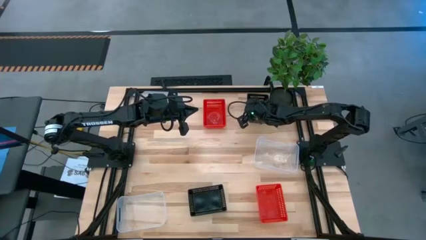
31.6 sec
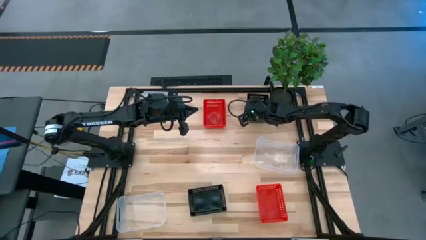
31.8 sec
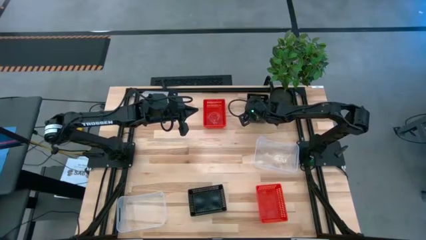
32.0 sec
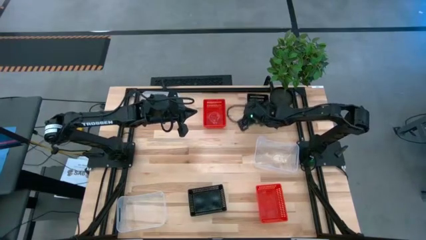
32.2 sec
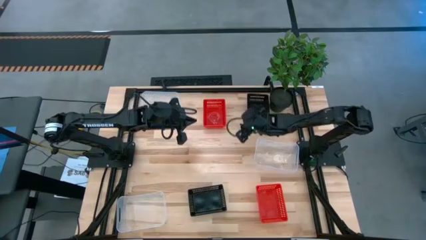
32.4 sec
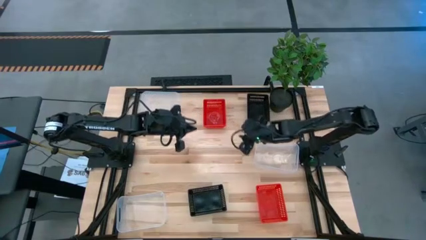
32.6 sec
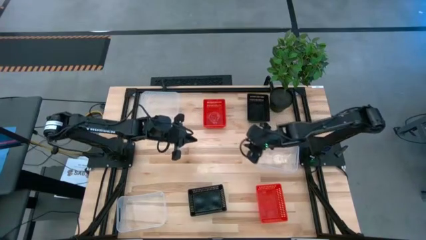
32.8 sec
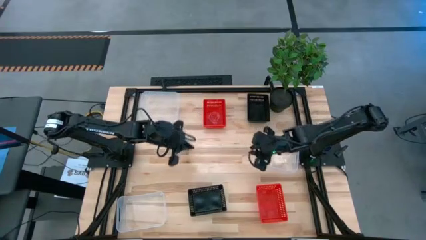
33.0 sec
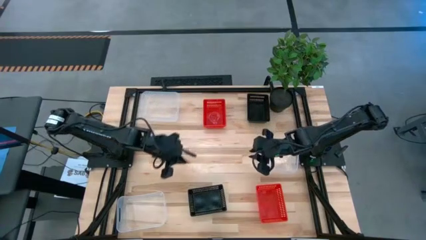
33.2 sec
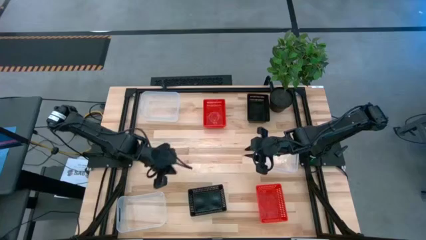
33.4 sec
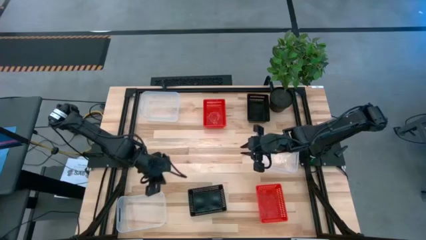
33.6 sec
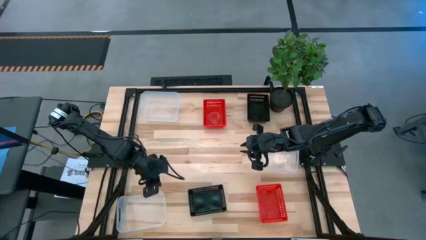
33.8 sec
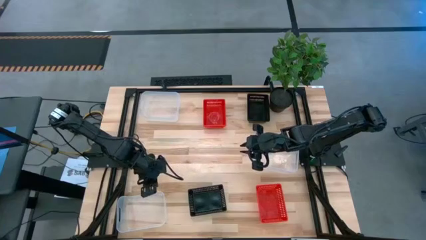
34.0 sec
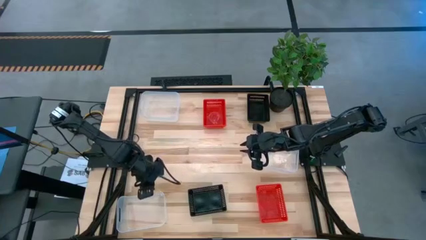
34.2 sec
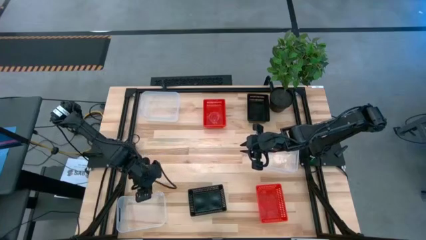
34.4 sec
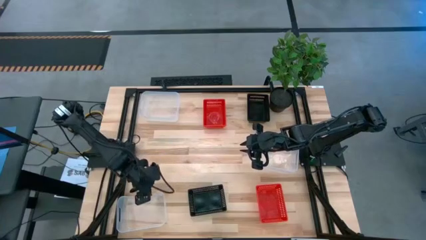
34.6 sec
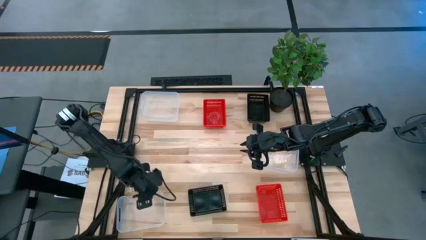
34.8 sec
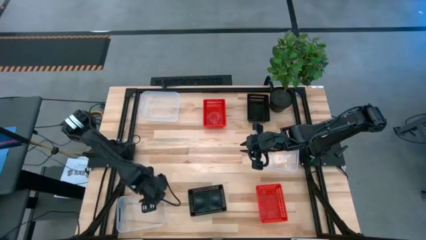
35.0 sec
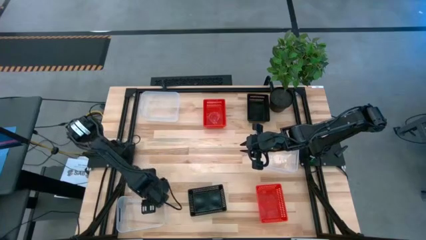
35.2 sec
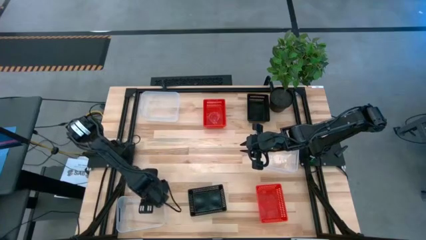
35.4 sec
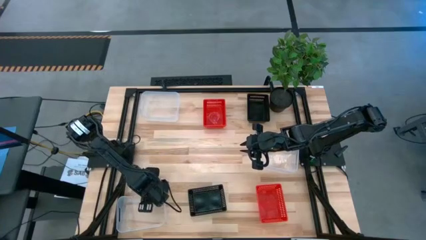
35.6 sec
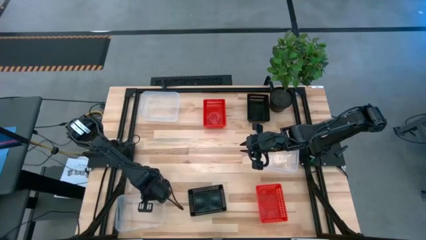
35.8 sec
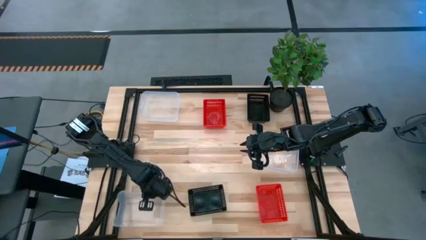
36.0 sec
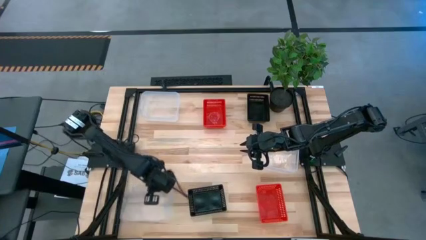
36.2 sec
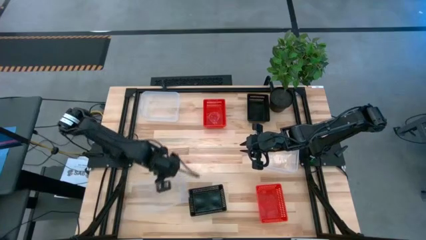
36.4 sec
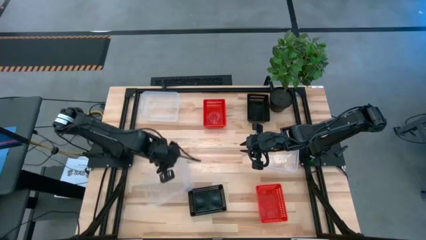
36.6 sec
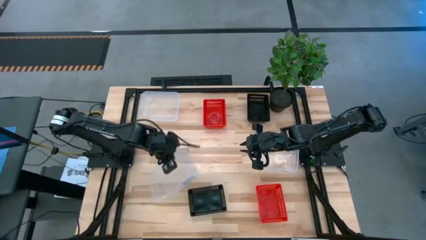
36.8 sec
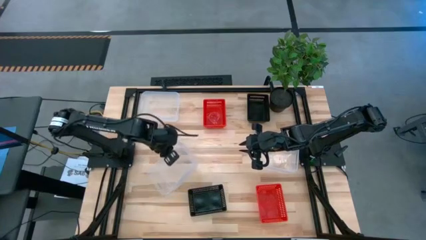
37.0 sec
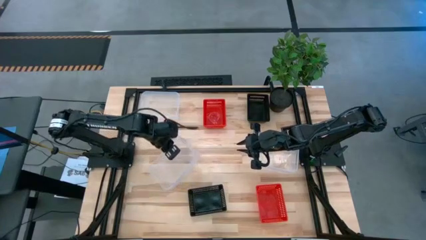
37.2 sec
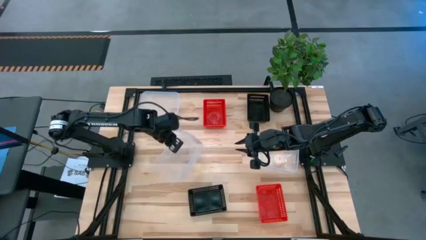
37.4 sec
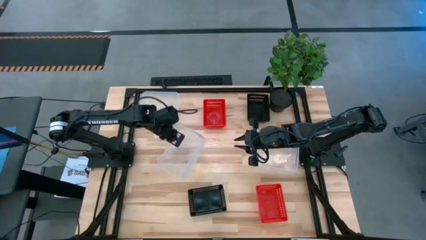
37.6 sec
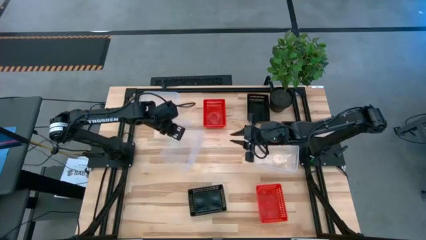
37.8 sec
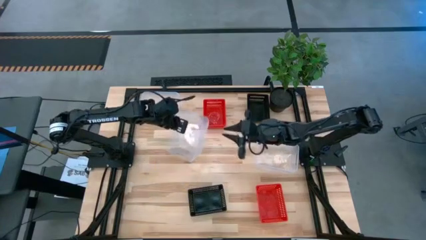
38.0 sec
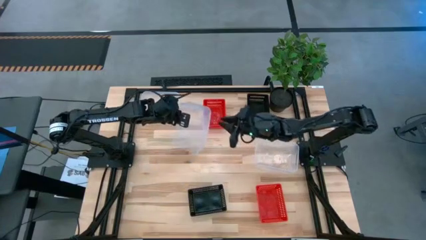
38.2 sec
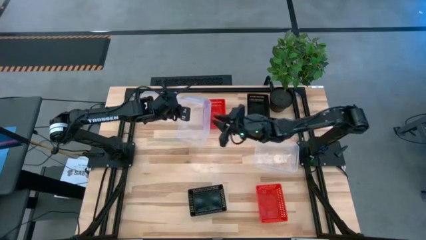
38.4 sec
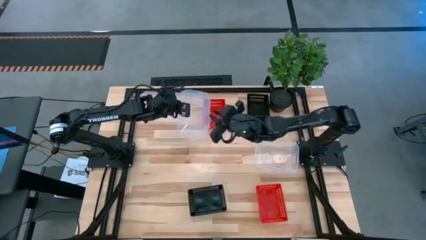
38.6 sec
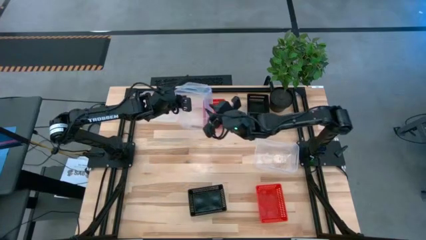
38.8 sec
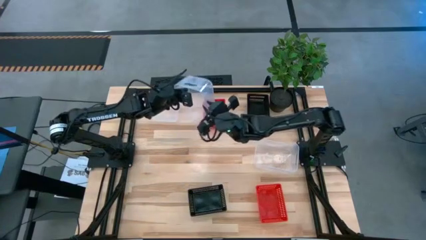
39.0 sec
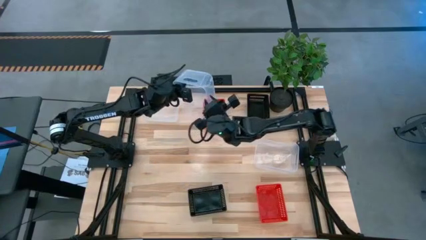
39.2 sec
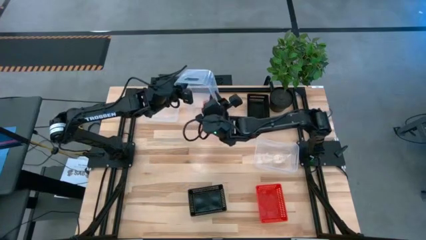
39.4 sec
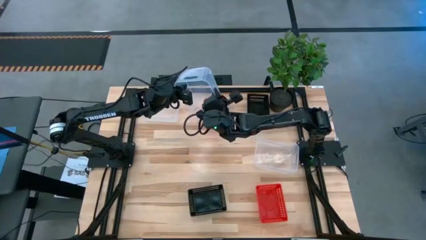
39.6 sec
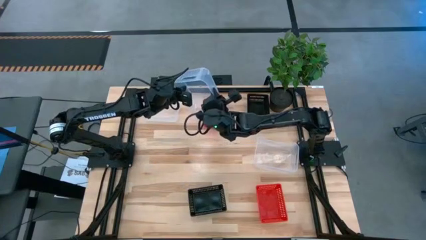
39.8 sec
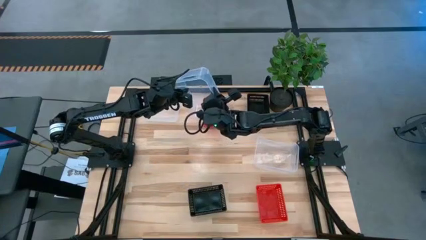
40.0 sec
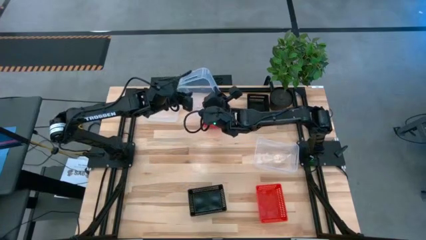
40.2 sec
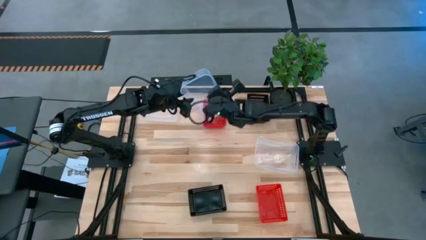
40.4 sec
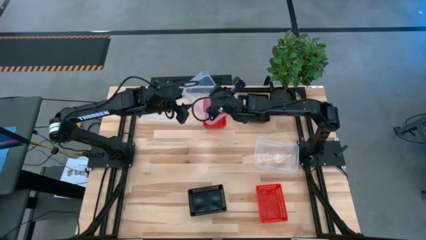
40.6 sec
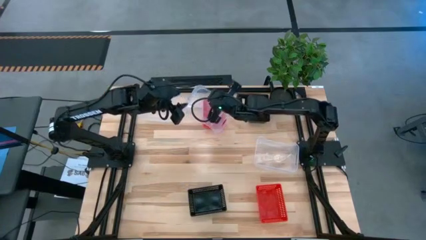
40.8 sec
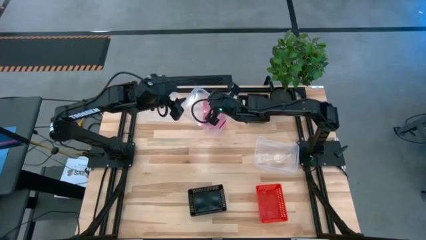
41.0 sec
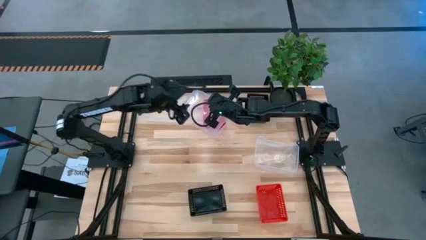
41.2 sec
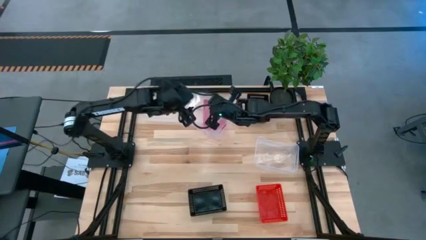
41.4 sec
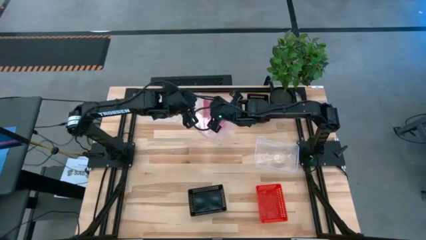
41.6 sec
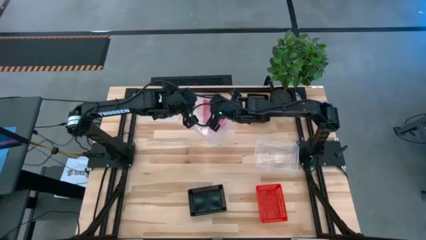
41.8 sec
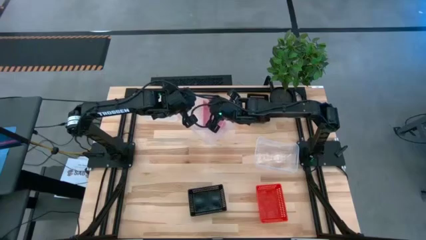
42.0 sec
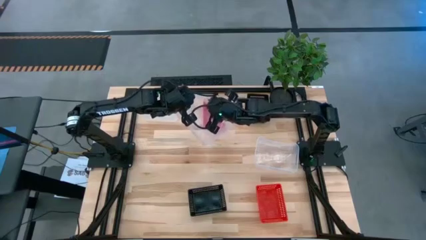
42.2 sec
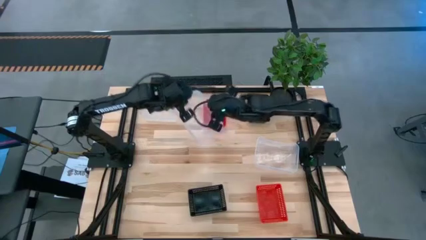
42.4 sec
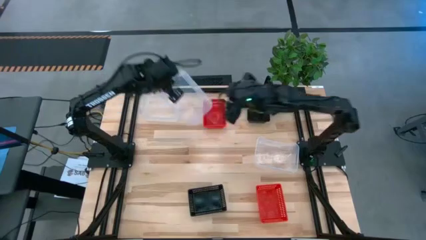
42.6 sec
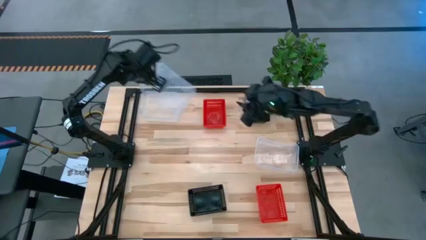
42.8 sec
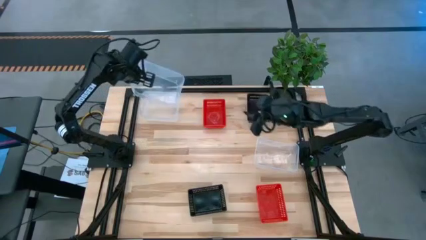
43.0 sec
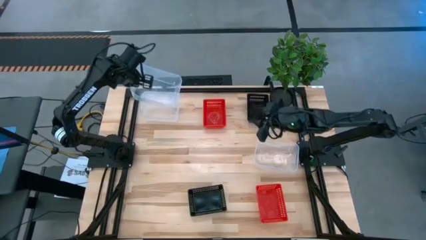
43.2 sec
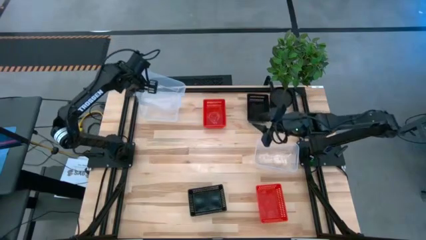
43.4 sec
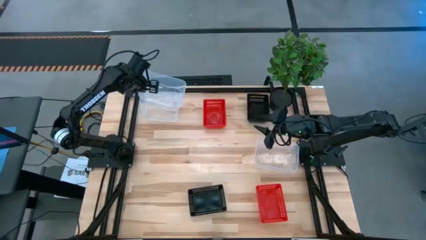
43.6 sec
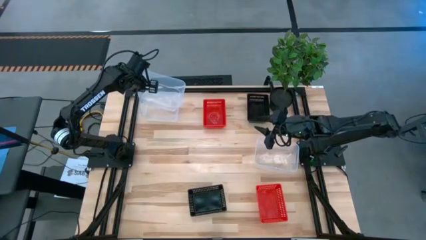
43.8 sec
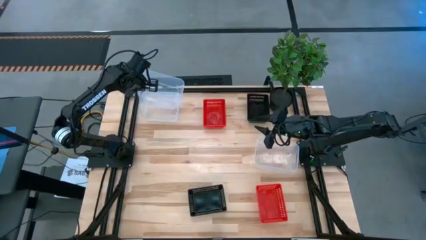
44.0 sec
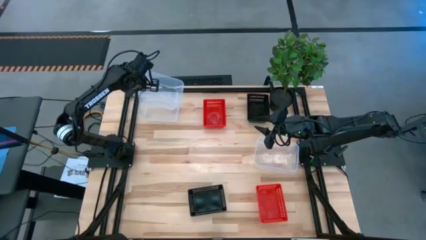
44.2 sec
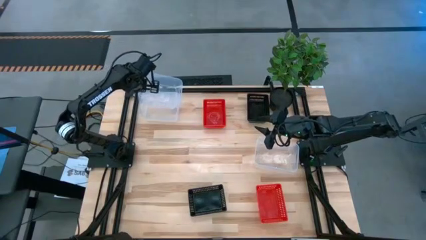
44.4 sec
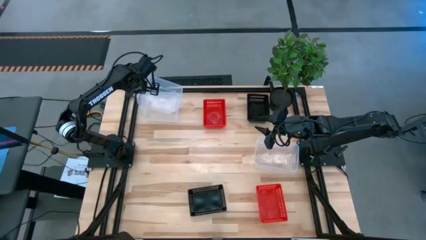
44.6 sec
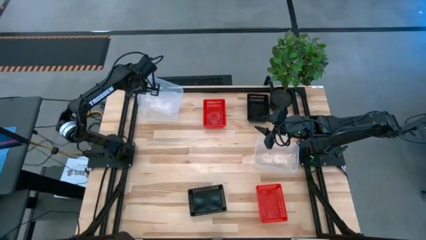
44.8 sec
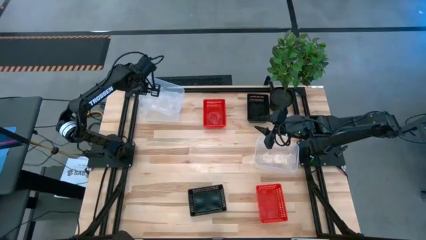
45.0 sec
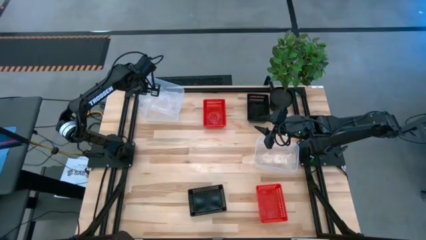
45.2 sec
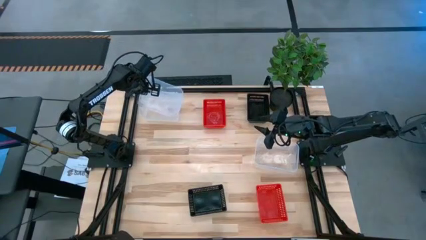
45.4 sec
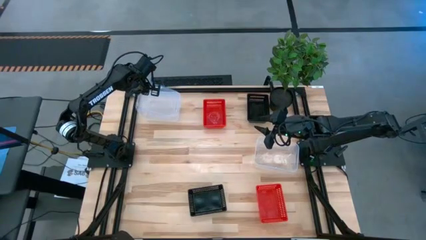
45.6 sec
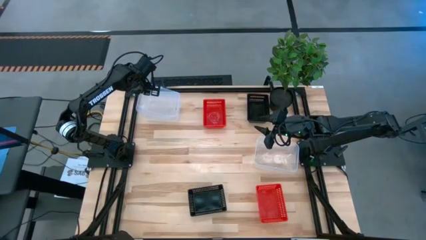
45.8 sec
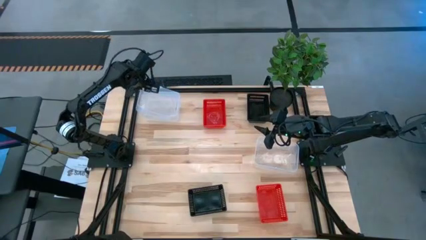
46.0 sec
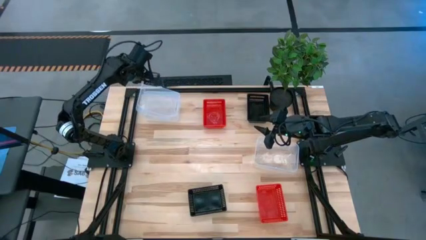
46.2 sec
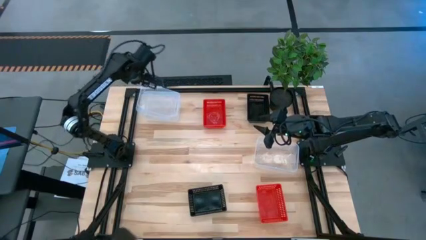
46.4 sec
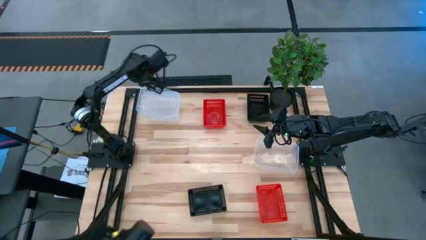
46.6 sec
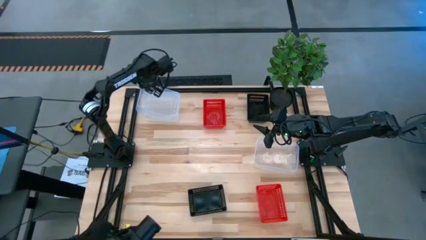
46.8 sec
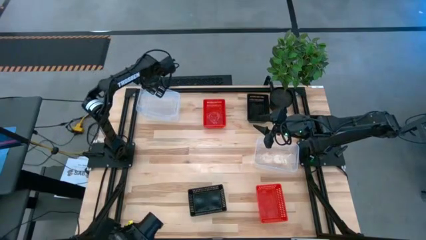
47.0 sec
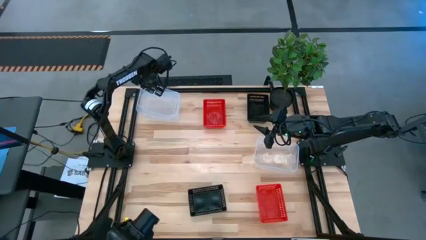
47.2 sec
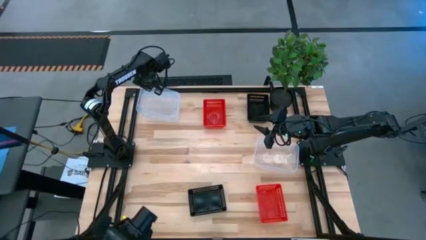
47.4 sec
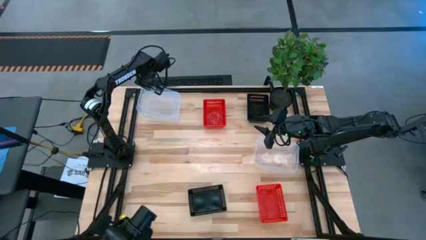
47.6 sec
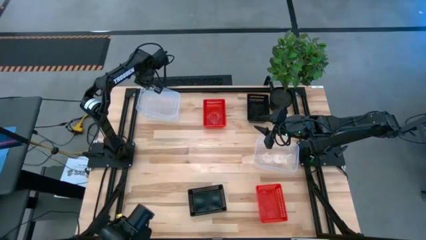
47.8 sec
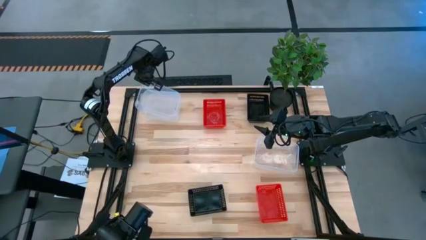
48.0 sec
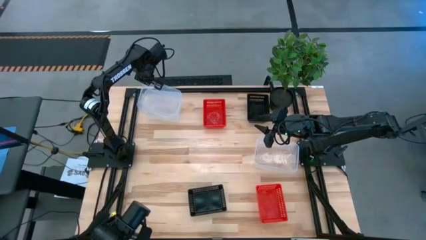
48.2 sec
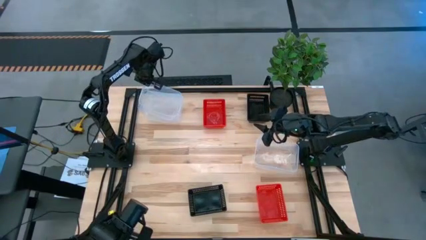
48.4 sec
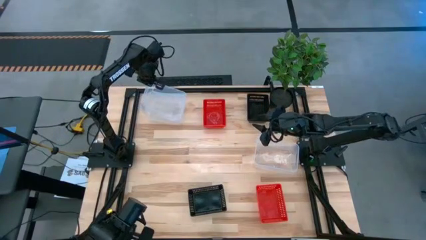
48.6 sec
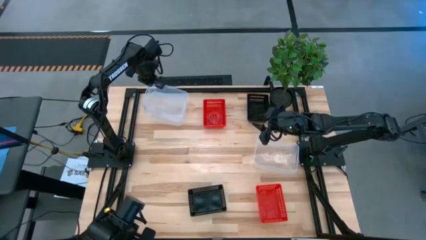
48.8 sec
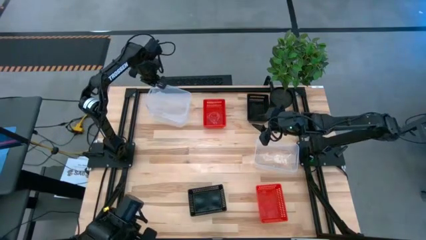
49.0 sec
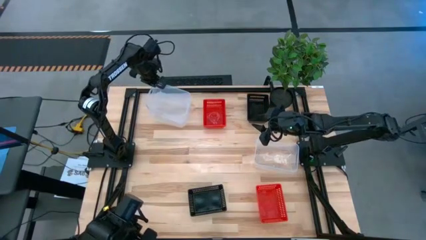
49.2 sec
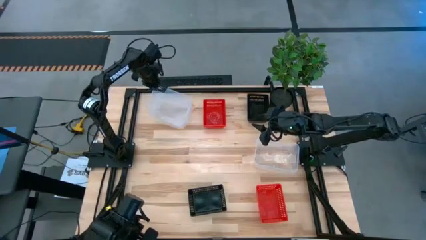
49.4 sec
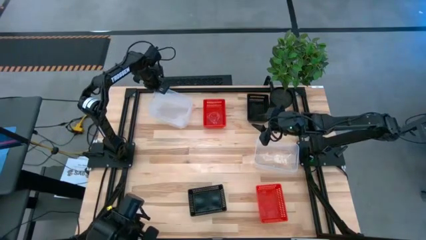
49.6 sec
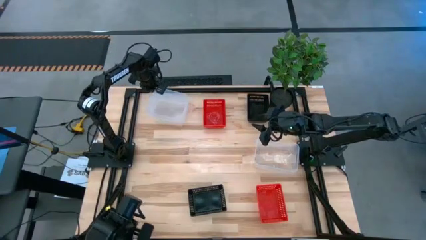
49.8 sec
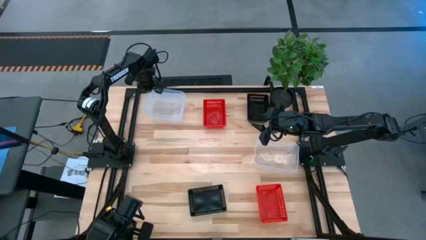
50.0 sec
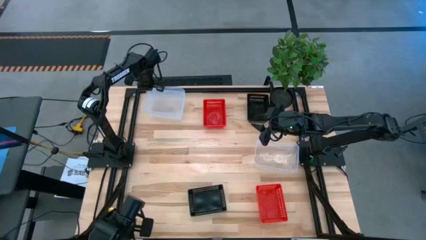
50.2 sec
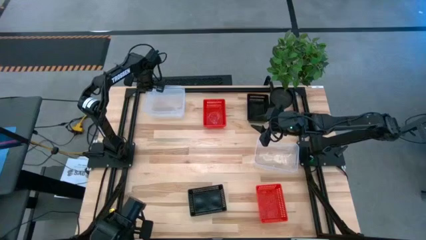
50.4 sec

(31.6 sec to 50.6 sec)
Stack the bottom left transparent bin on the top left transparent bin
